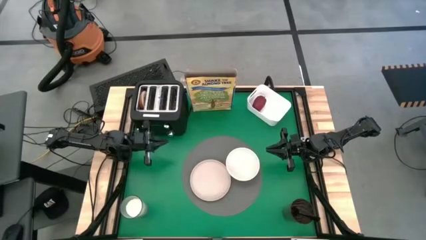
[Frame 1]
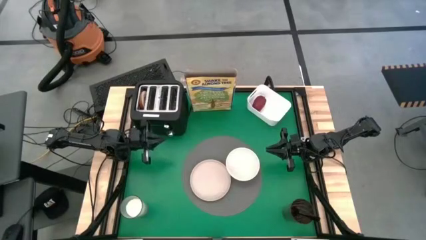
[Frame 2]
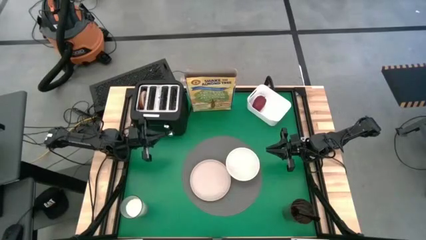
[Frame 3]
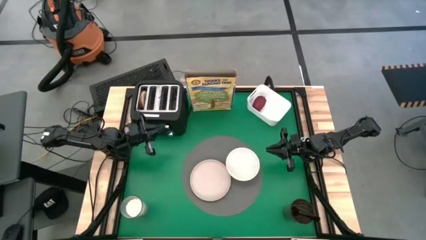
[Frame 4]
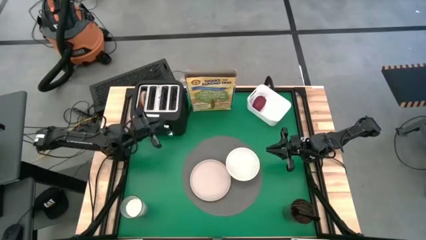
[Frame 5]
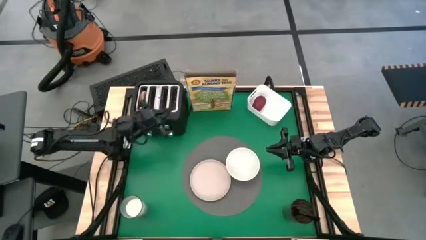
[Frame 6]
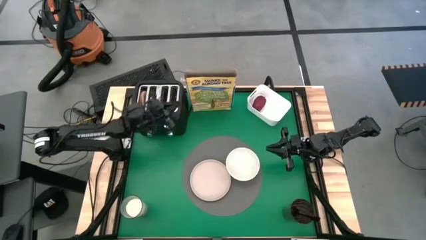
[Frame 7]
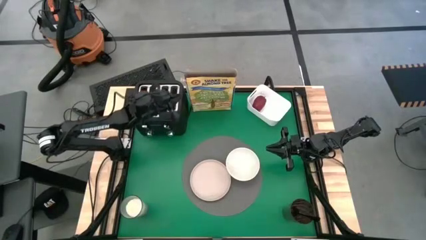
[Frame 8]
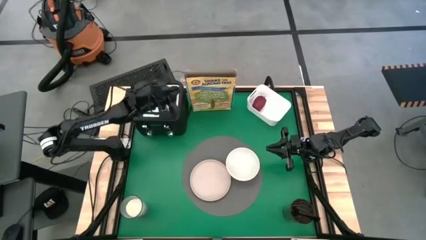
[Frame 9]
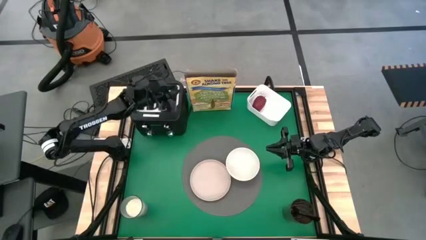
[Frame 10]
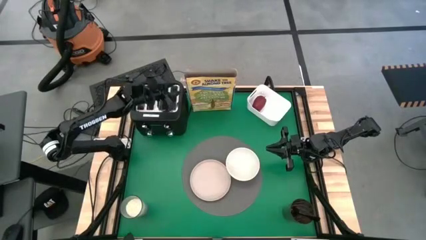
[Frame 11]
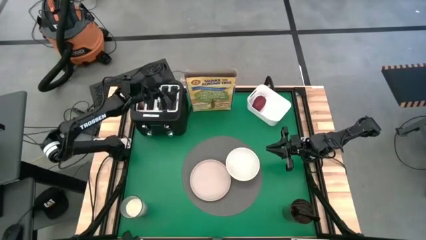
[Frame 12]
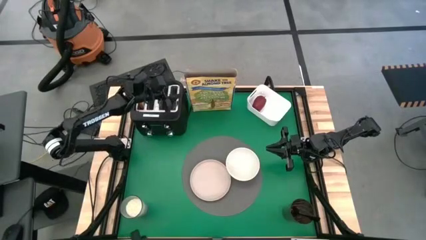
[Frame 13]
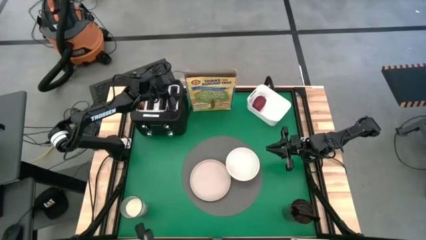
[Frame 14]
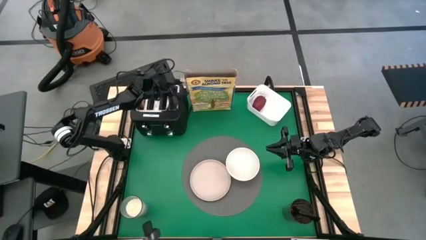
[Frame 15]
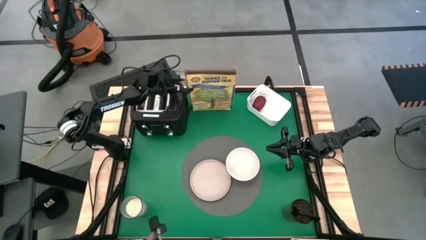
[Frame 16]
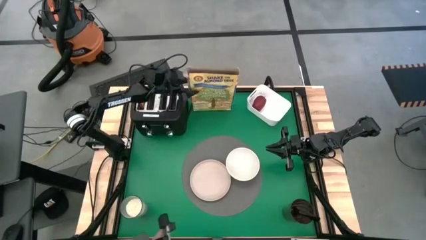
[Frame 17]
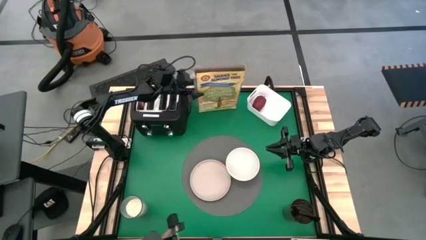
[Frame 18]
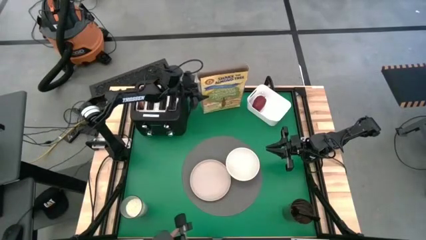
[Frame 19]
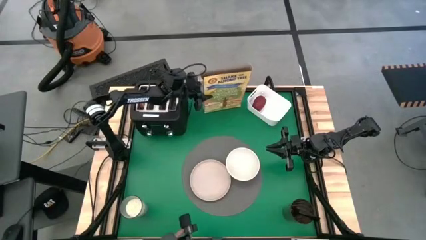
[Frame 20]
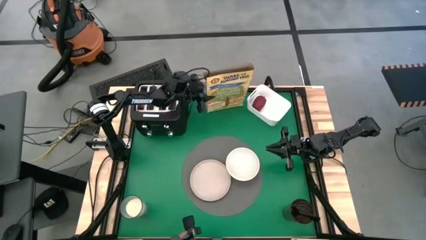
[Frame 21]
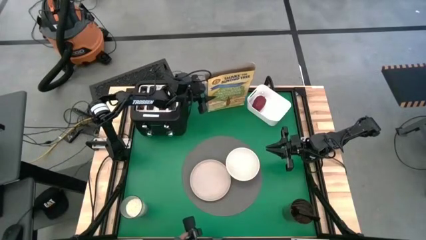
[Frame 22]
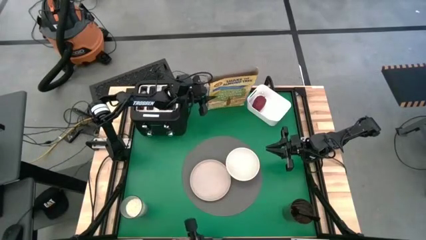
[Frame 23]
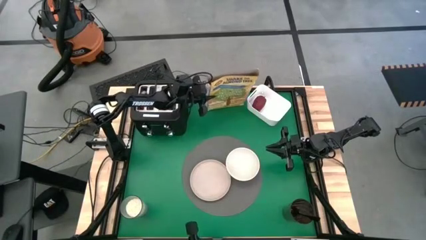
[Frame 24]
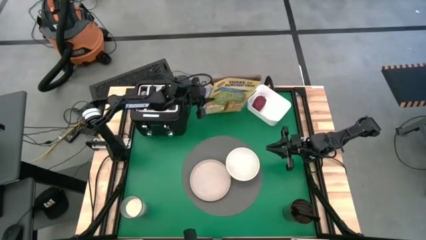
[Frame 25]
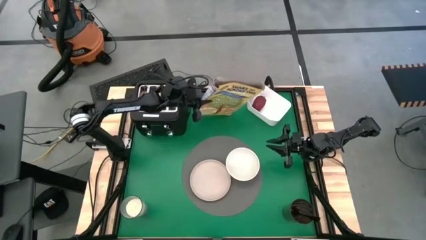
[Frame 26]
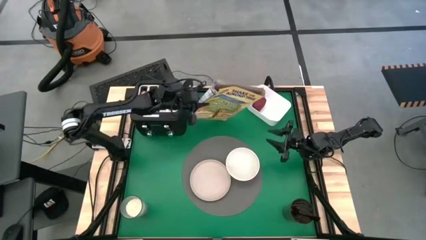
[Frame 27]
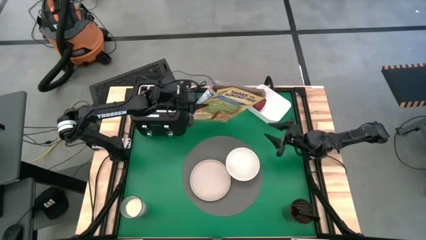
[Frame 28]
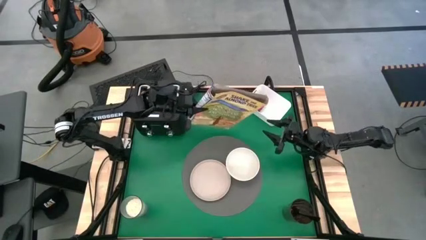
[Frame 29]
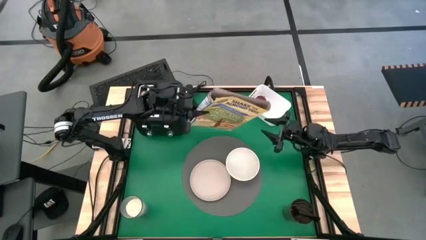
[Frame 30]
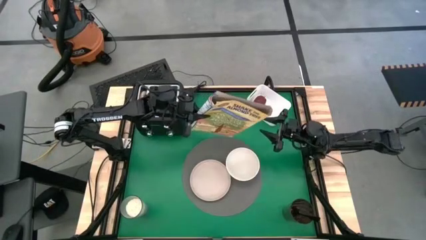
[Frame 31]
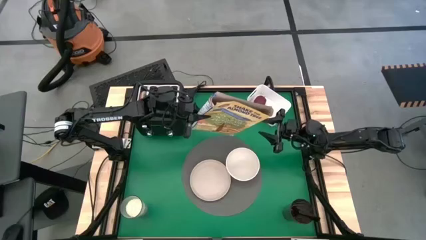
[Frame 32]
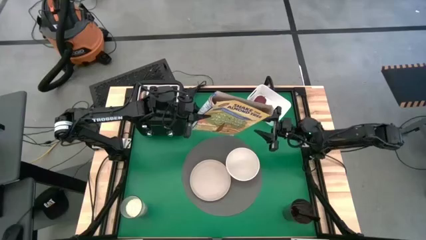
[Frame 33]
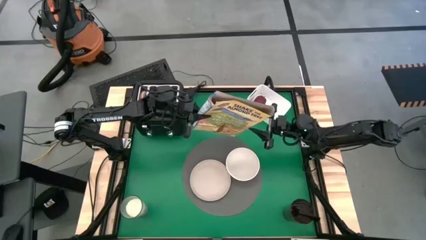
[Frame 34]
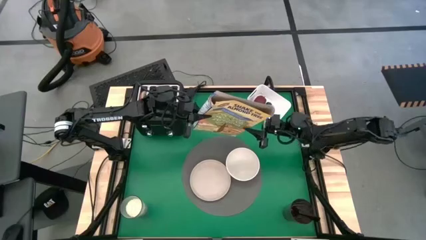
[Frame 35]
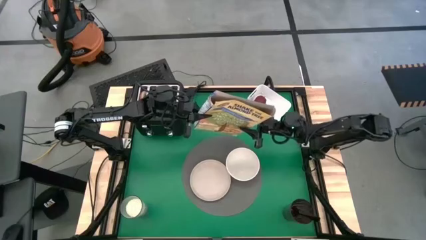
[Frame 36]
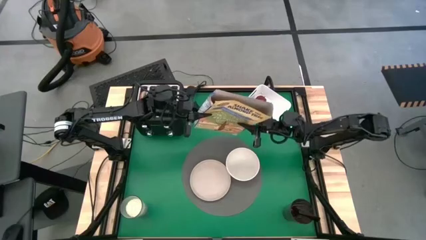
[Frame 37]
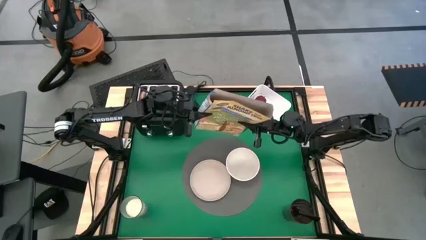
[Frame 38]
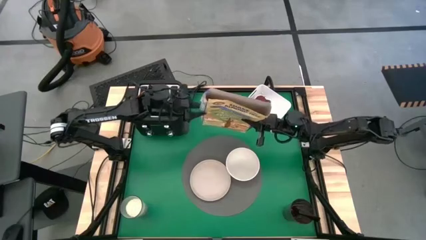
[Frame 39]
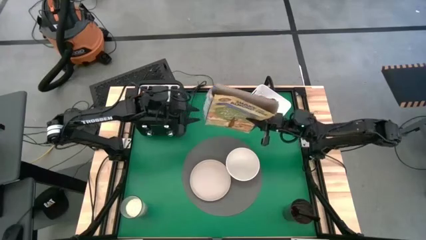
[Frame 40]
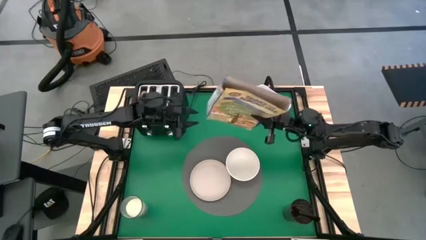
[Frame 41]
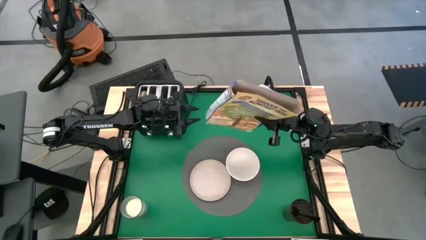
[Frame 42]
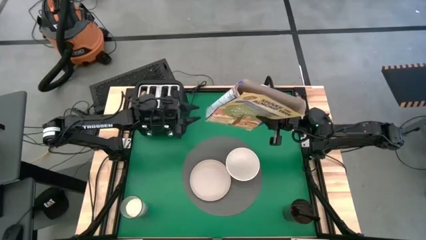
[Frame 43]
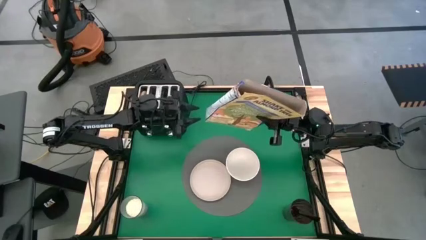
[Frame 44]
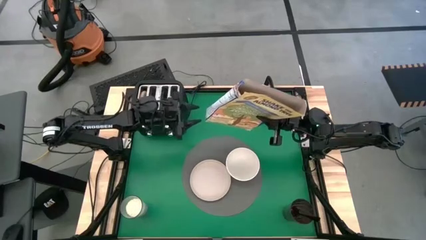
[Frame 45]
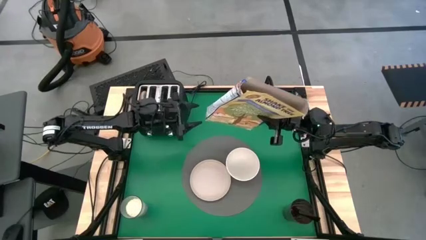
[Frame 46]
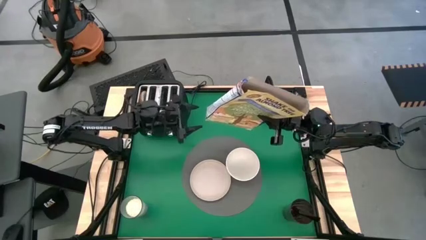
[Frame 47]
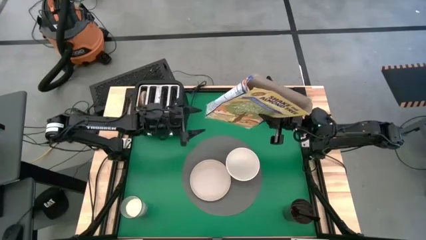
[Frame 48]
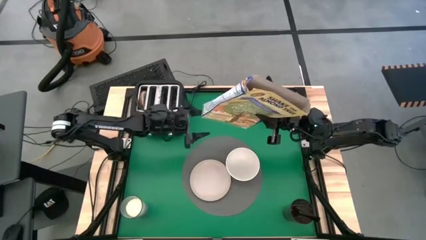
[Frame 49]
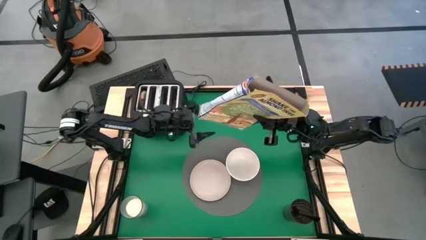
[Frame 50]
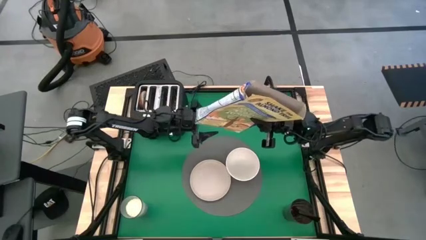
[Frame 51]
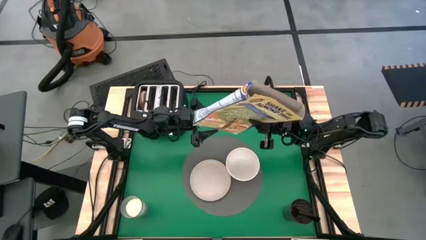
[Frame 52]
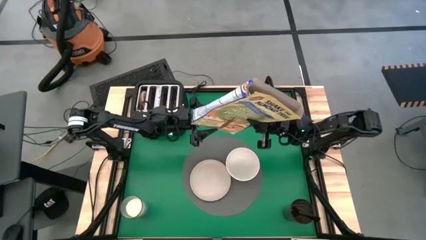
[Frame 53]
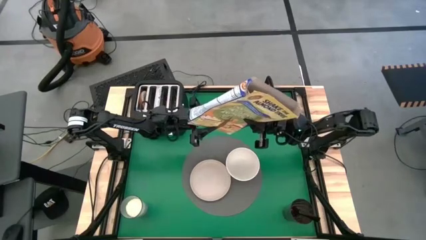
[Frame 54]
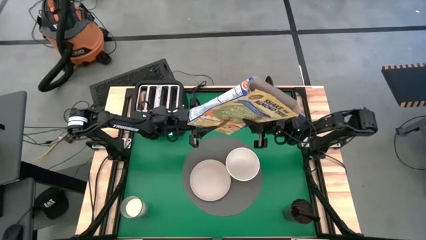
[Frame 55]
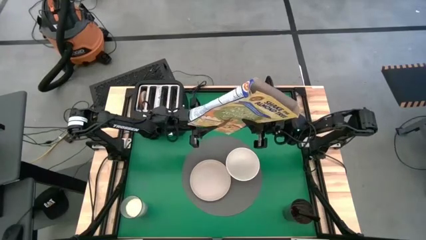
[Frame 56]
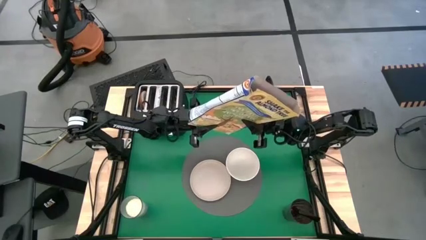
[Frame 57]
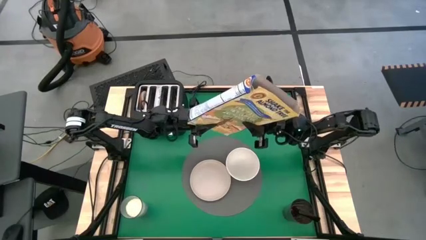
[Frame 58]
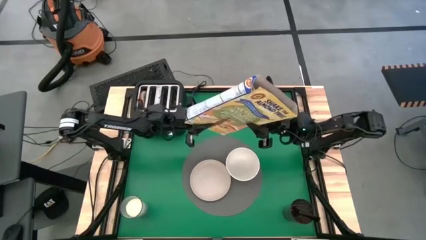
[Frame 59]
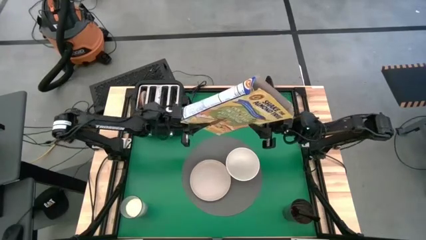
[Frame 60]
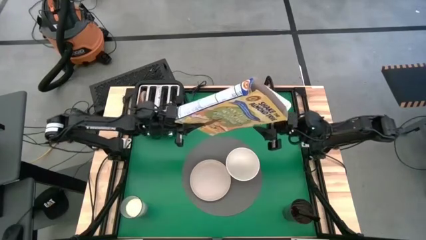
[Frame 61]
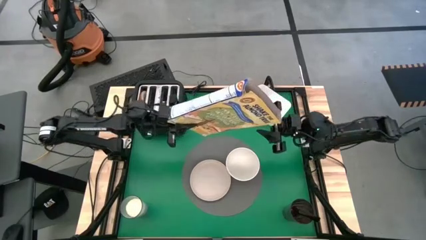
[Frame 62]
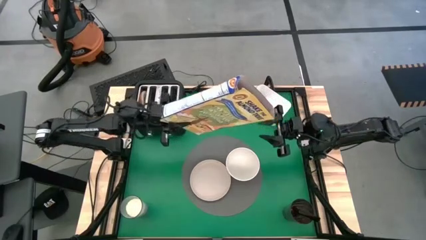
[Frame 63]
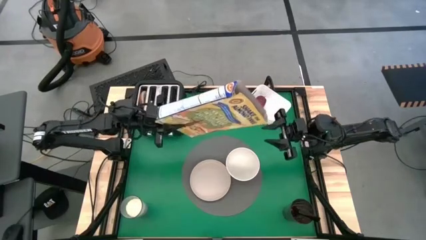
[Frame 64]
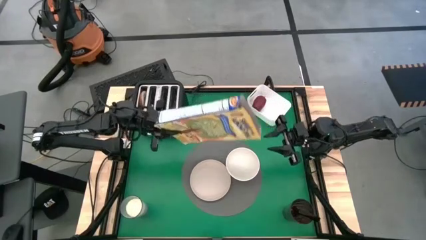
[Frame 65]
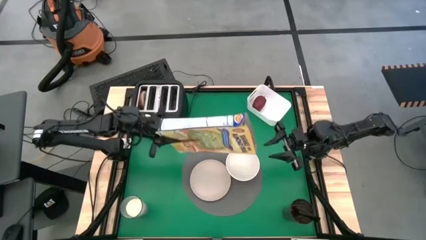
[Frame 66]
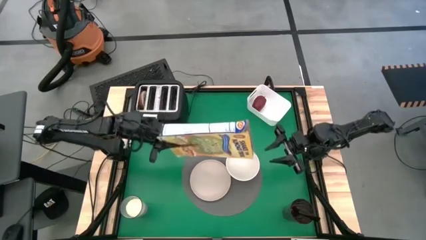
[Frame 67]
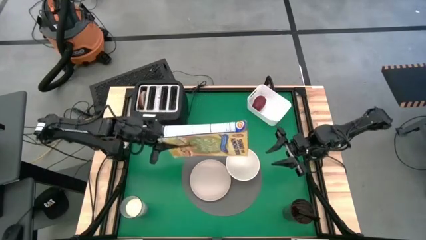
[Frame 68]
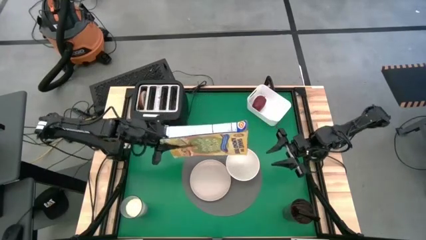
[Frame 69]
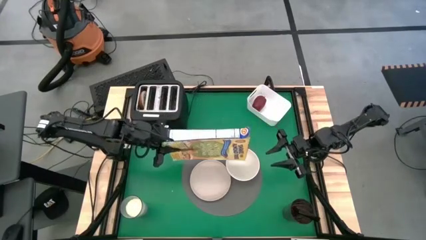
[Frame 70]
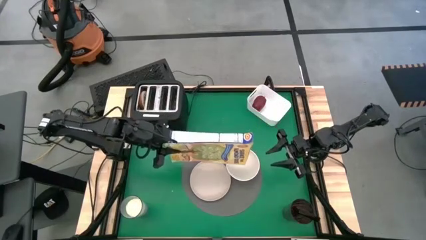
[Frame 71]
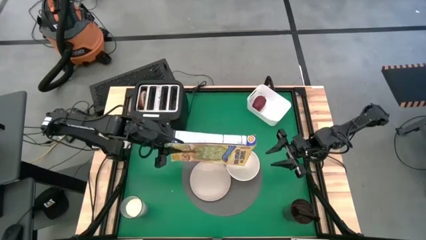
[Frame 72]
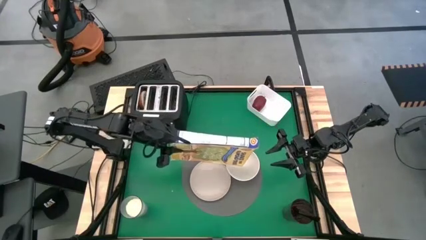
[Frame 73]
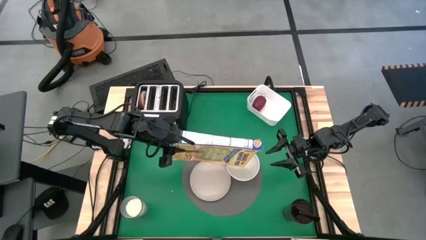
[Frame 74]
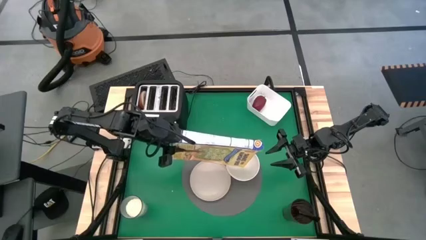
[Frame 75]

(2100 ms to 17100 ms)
Task: Arrange a breakfast setting
Pour the cereal into the white bowl
